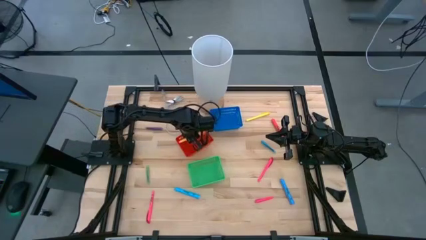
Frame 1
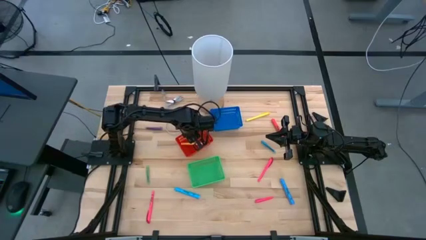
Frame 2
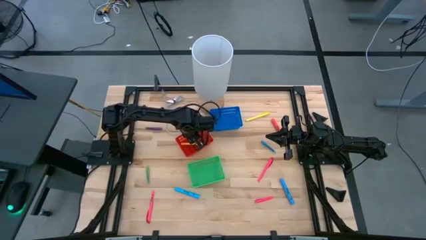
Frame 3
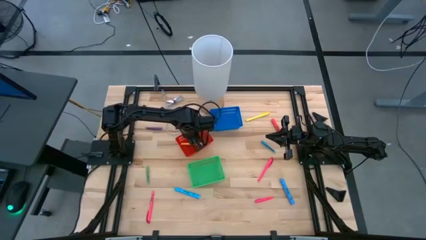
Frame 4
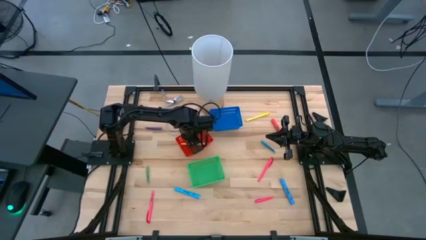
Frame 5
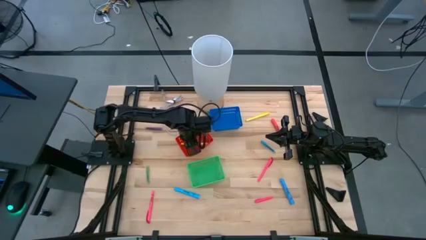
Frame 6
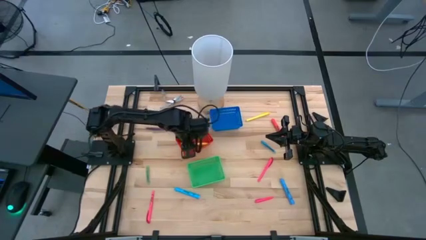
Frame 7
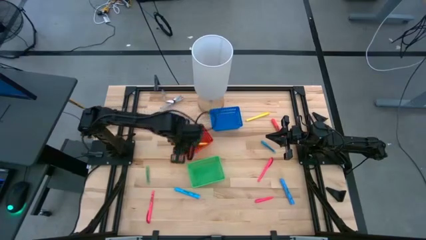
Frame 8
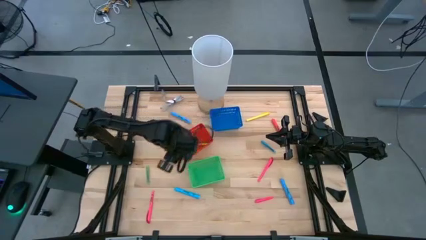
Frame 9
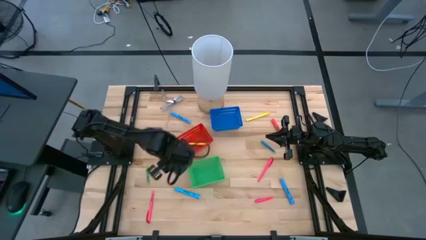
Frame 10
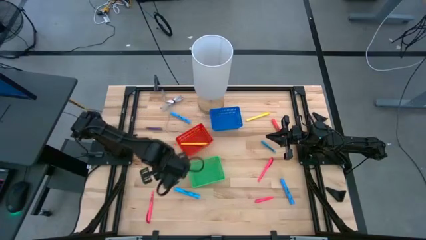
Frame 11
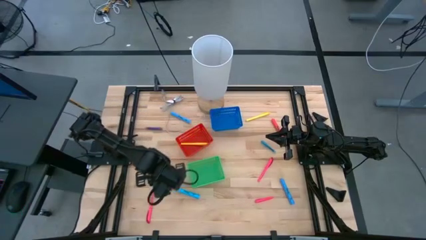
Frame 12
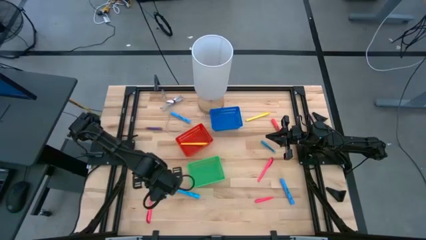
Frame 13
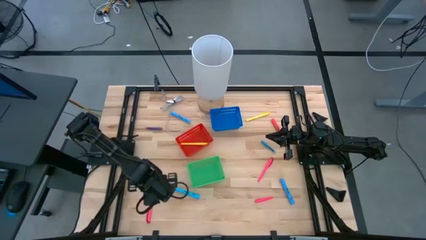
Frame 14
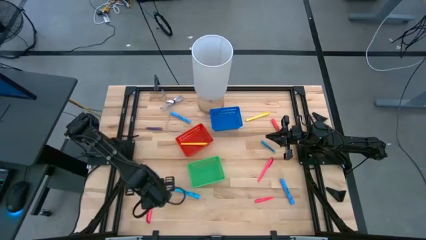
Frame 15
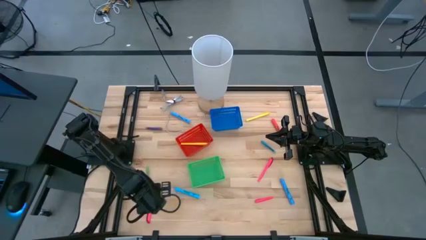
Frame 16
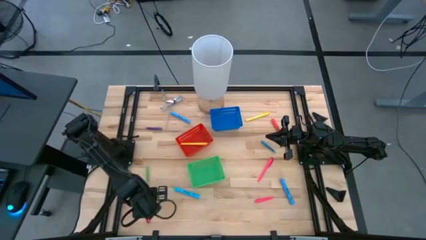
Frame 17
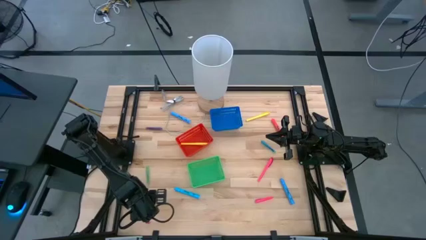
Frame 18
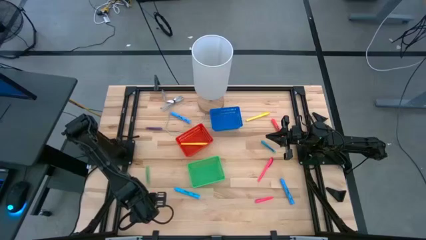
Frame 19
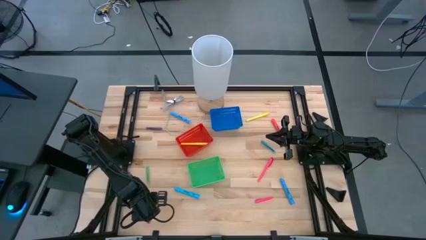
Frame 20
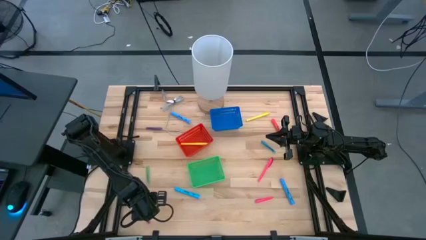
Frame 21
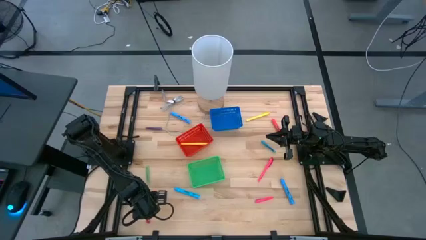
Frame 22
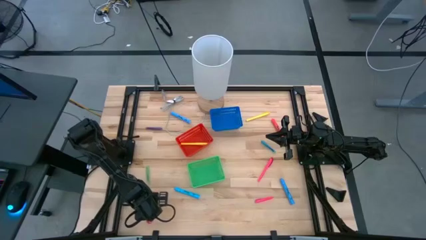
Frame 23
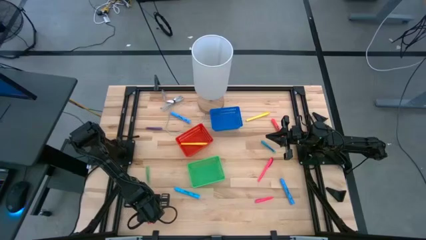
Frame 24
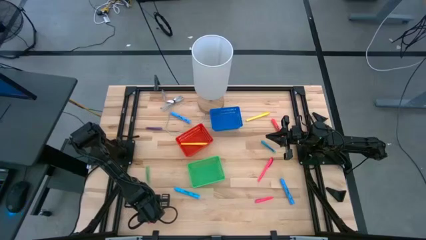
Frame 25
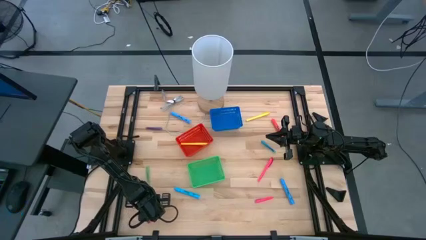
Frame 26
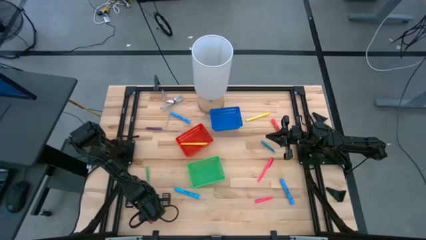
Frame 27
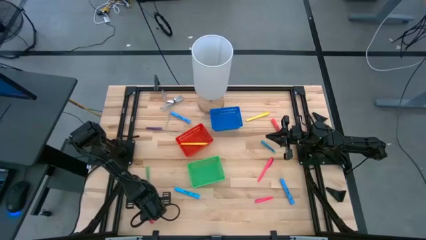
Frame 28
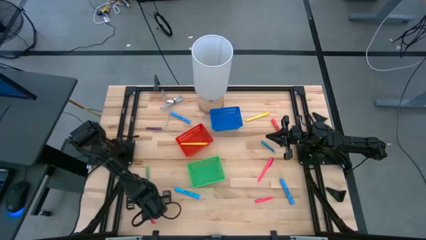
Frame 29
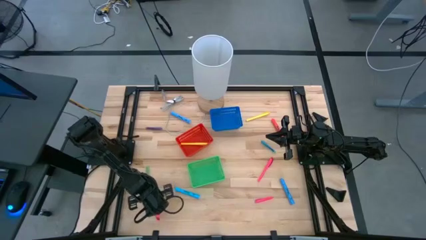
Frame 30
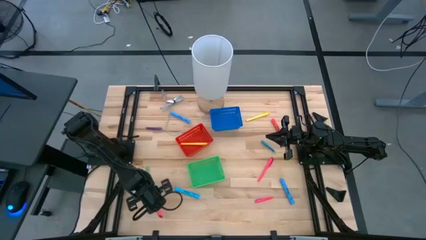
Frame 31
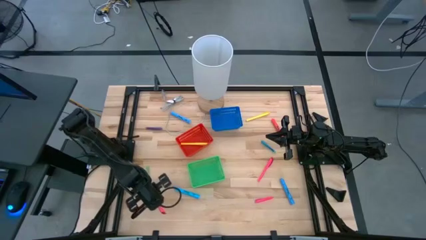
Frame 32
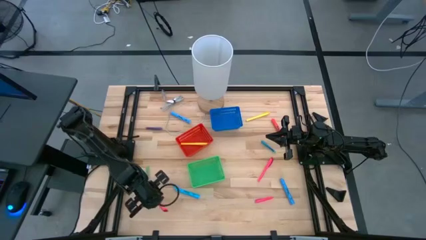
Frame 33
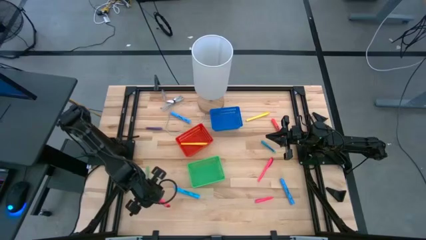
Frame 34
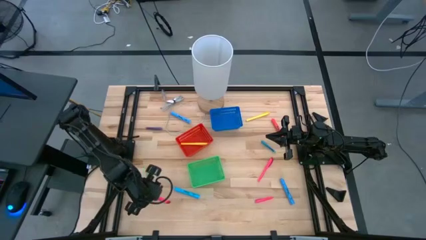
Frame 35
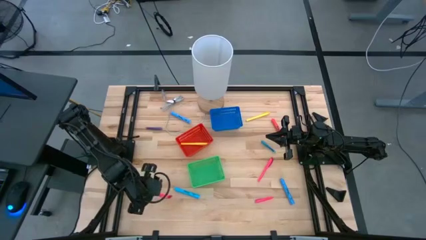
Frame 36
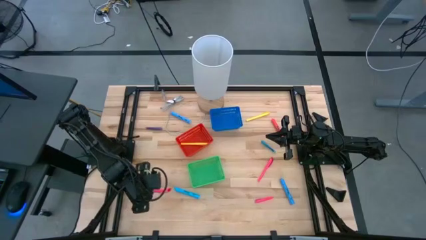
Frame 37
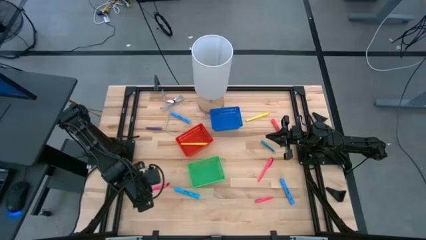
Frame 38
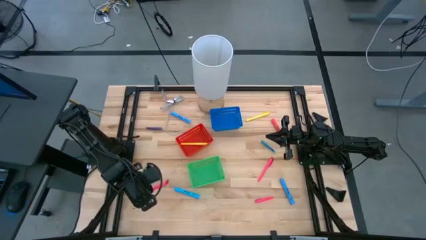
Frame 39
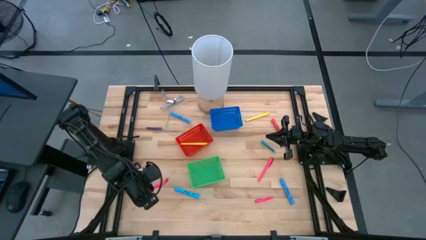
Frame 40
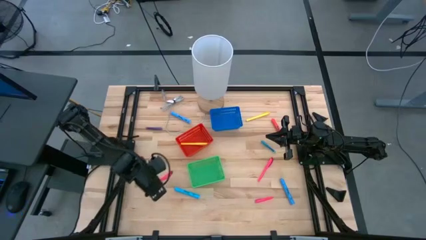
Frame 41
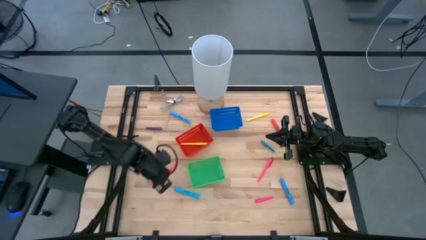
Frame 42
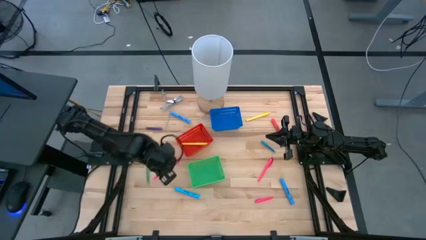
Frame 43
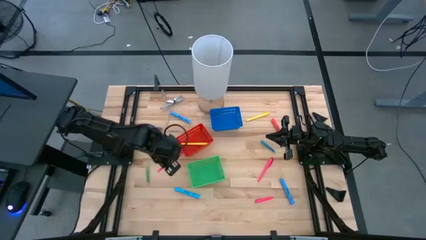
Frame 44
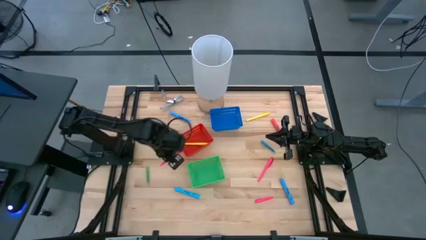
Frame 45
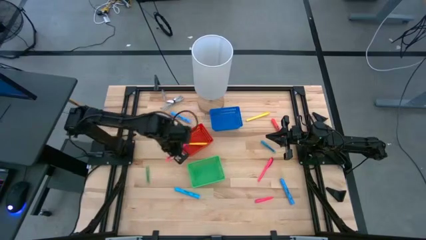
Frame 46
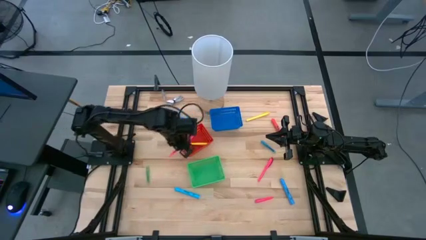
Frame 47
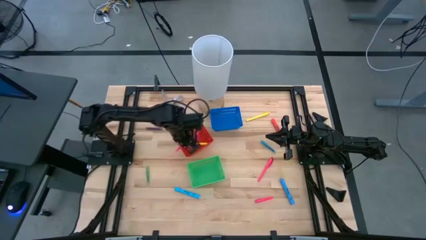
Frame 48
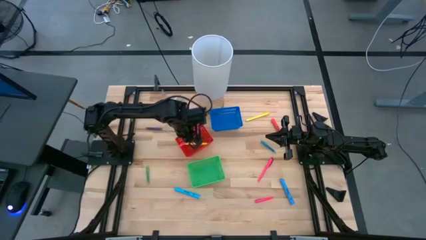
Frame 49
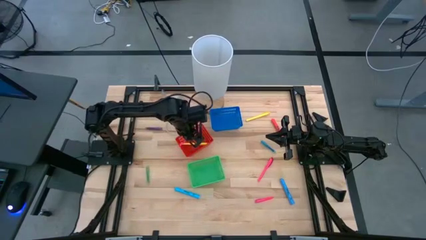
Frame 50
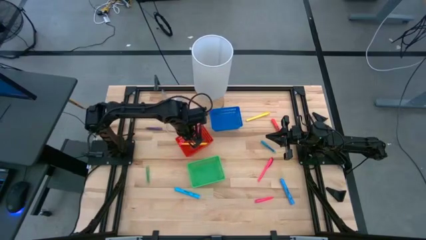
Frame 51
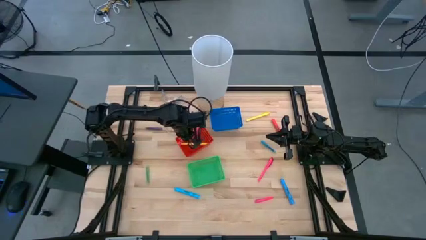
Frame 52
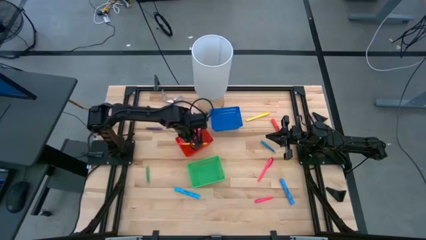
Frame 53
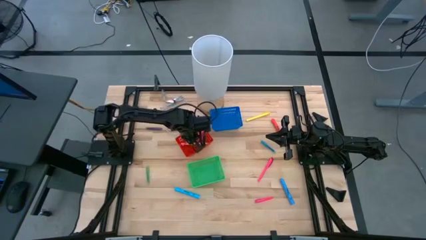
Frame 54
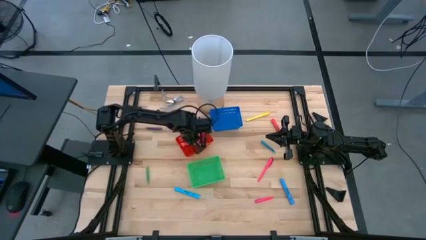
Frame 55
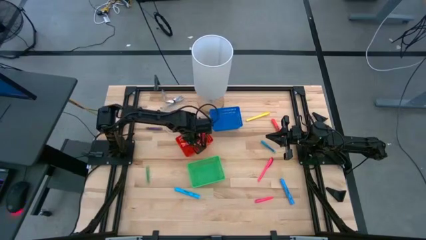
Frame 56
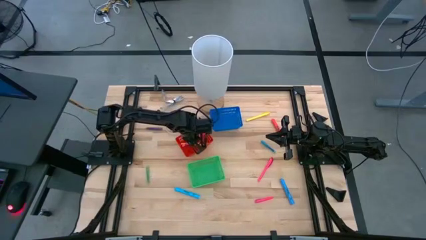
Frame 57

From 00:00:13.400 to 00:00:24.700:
Task: Pick & Place Markers
Put the left pink marker into the red bin

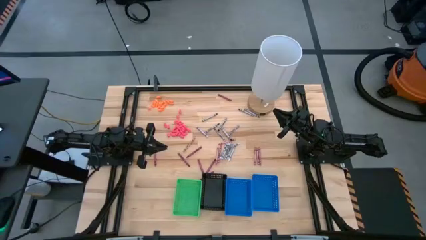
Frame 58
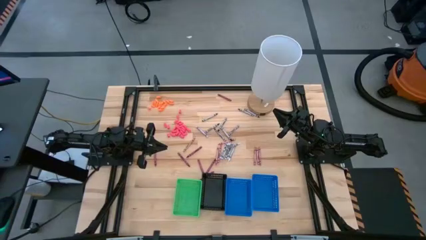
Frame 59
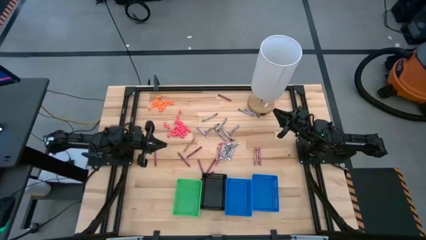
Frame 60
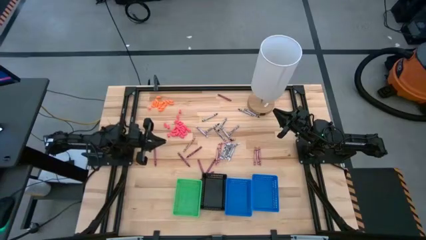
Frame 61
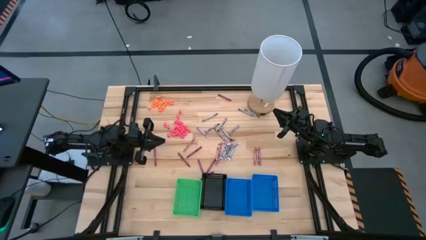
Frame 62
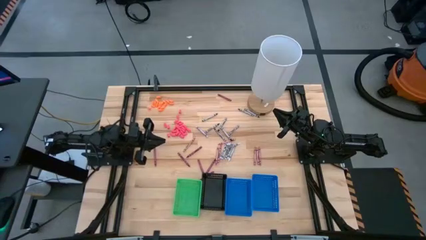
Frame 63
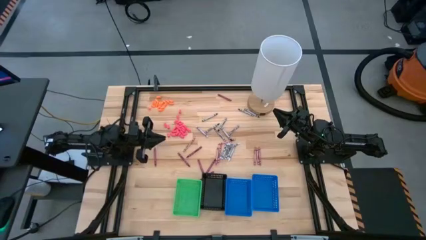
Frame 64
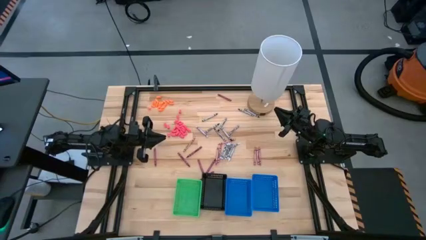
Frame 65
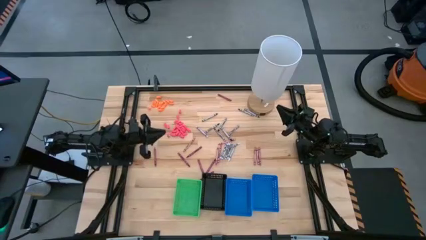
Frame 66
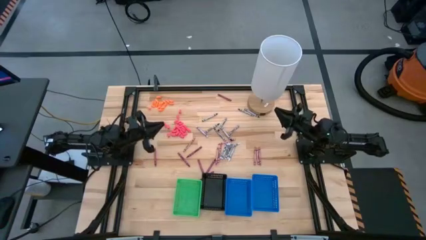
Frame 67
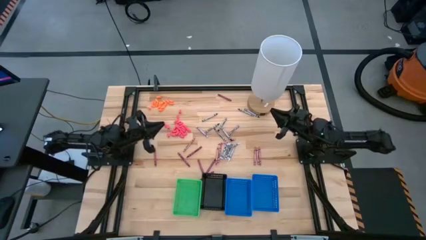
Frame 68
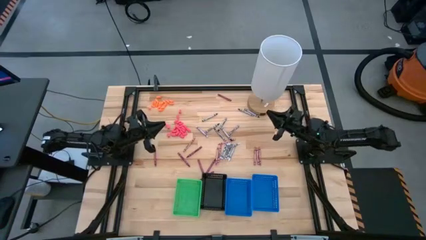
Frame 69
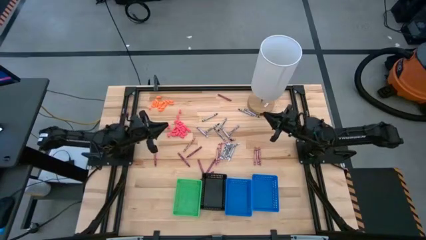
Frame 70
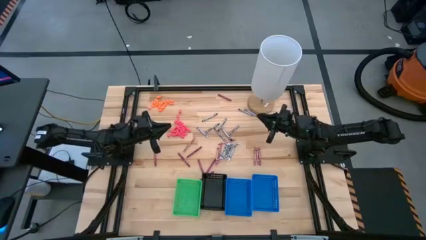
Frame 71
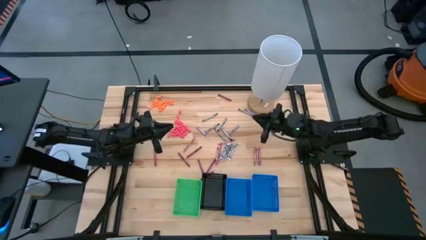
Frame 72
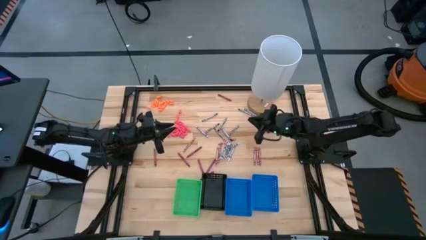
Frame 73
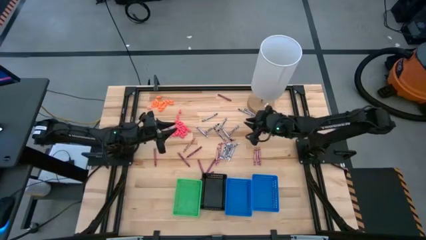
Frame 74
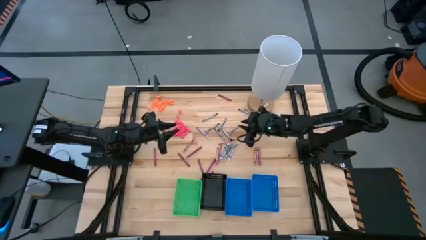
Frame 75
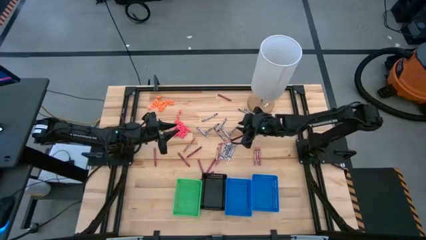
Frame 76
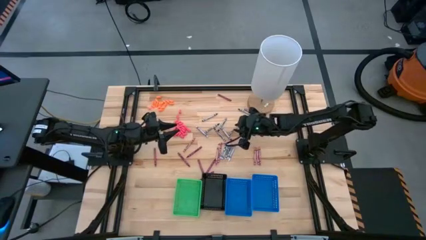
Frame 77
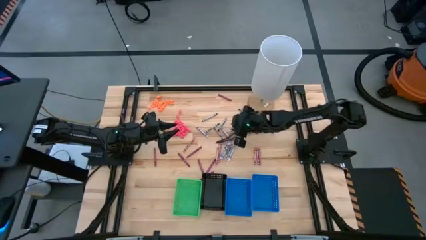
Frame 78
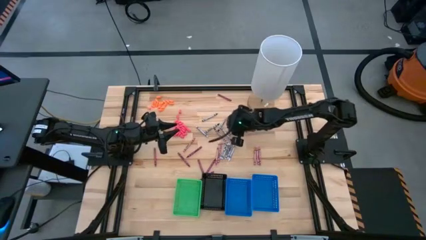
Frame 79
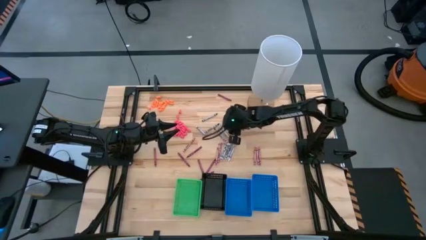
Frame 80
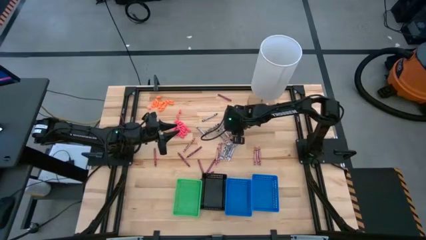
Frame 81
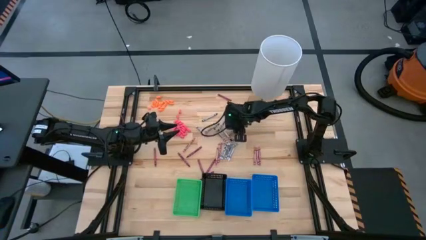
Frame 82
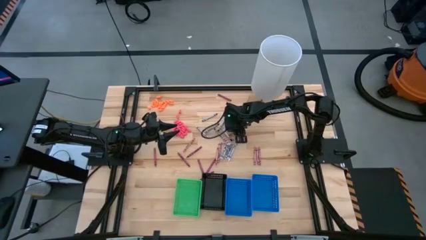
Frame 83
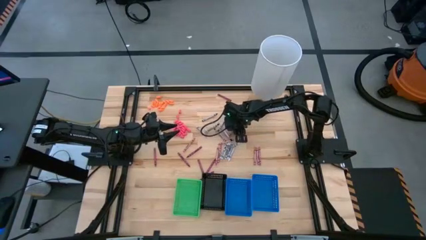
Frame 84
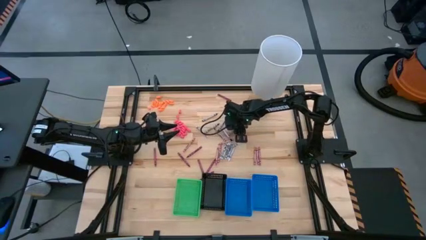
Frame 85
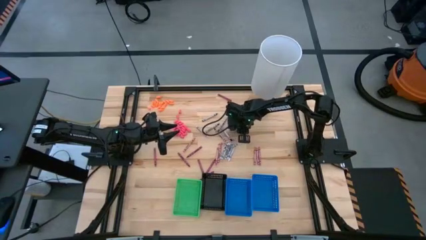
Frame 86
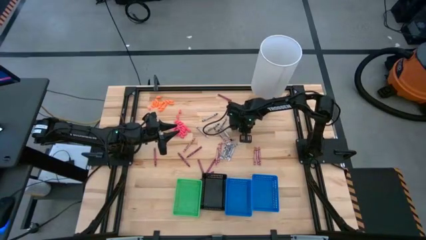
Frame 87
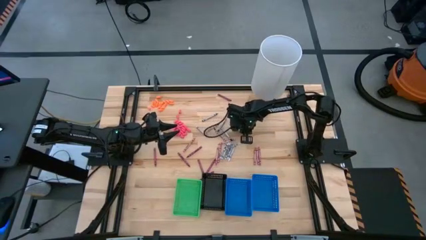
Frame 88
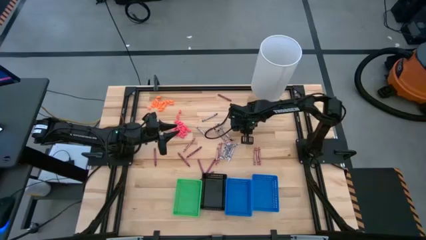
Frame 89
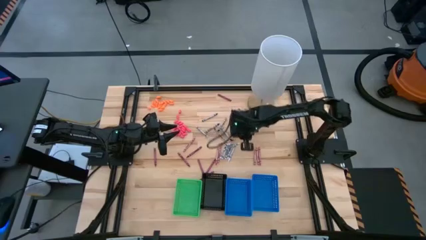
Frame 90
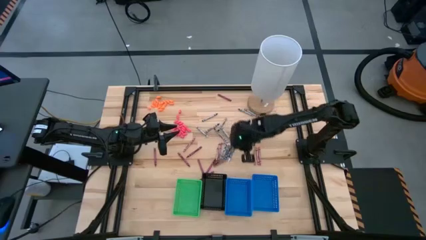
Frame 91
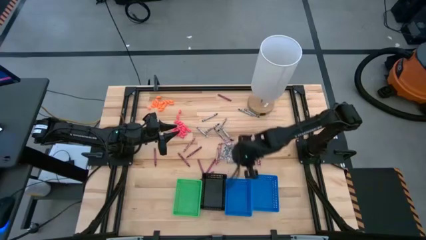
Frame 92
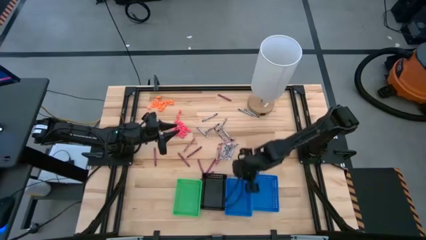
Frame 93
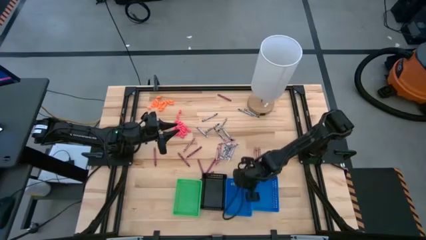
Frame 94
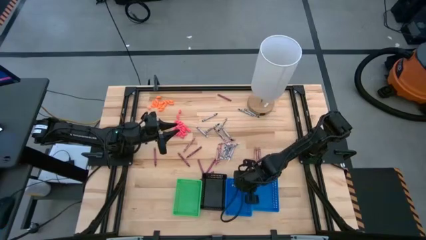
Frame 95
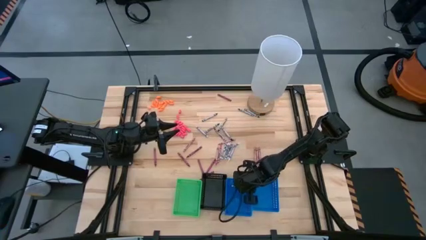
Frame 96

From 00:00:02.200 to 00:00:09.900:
Task: Sort crayons
Put the black crayon into the left blue bin
